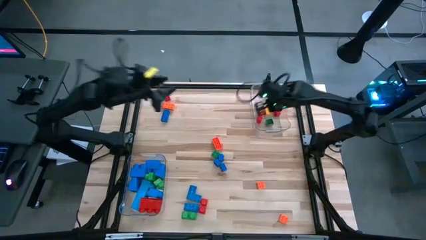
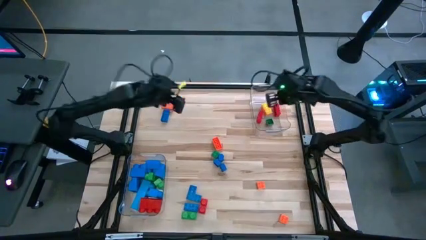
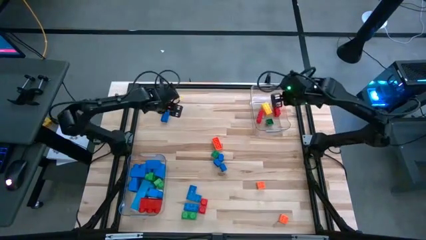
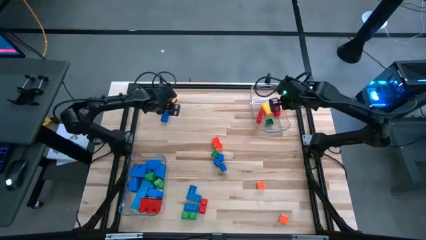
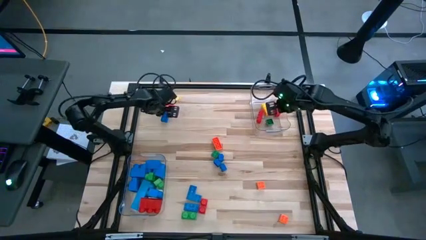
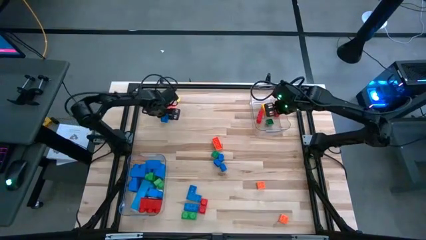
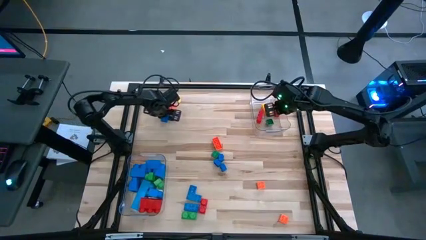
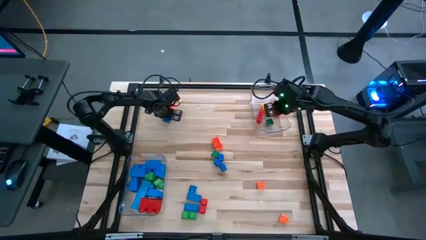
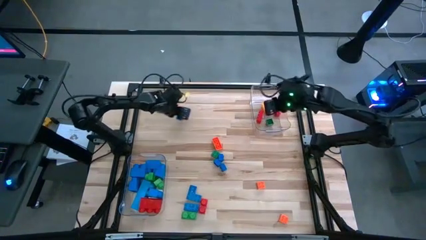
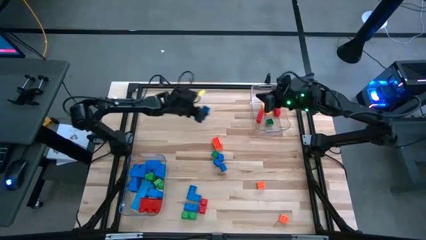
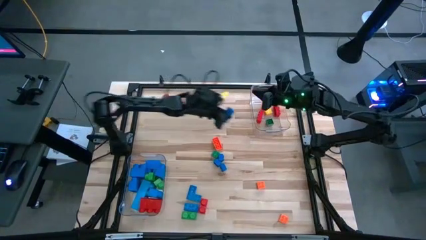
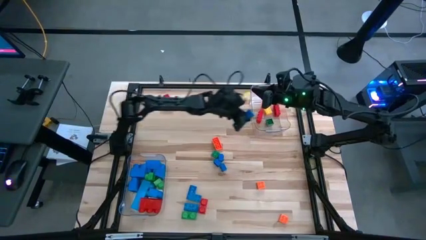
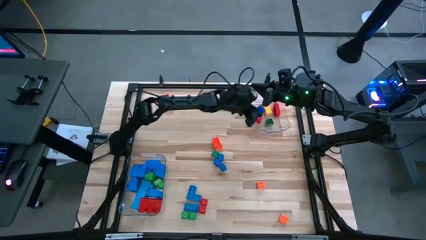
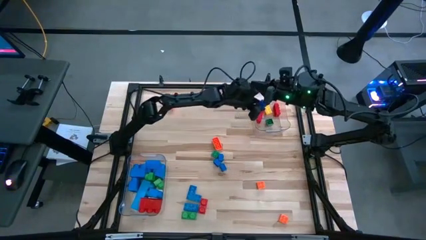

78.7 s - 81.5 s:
Task: Sort blocks by size
Put the small blue game piece into the top transparent bin

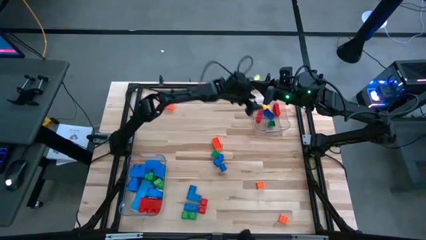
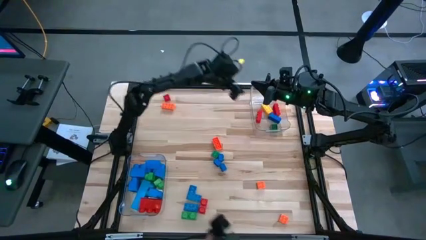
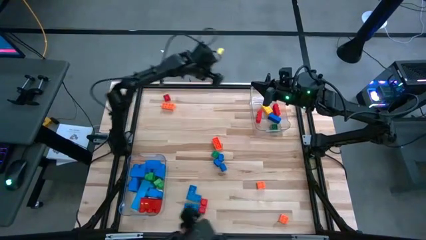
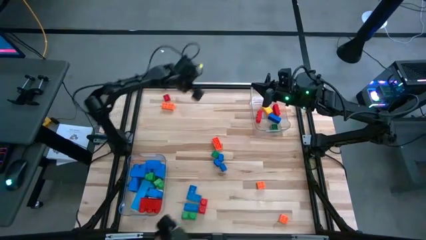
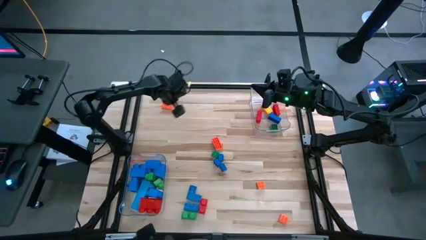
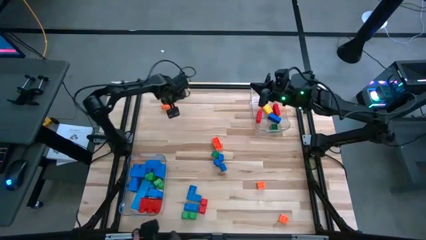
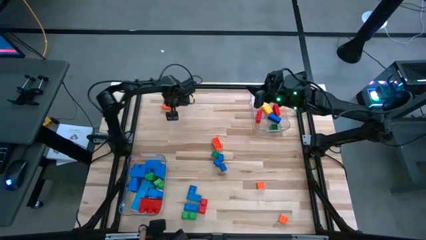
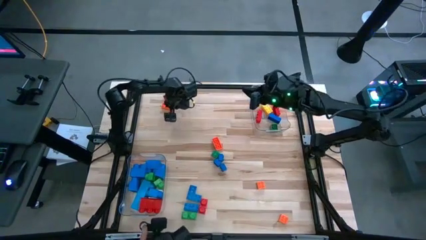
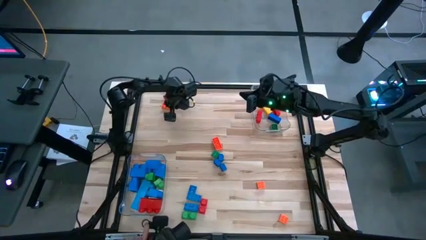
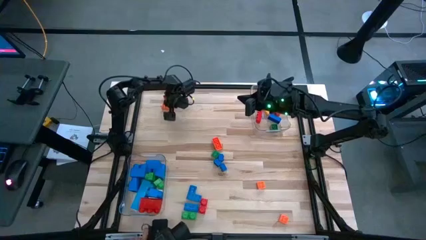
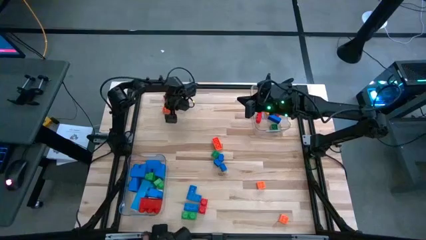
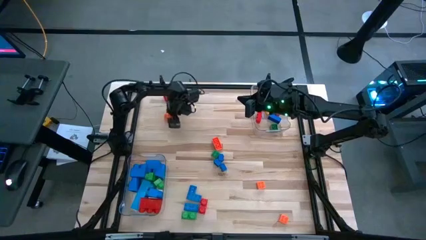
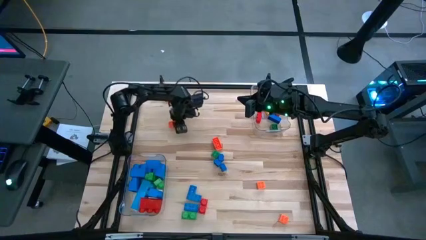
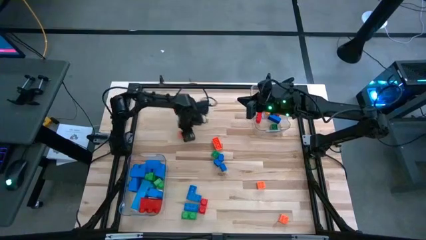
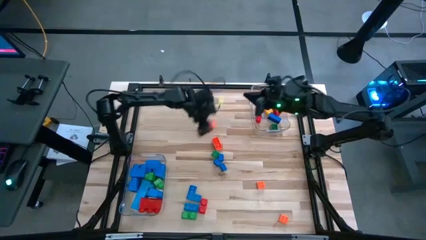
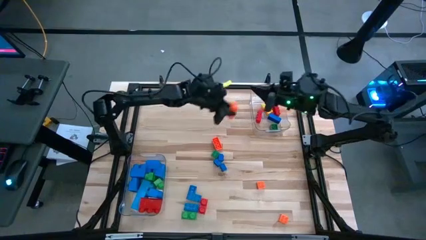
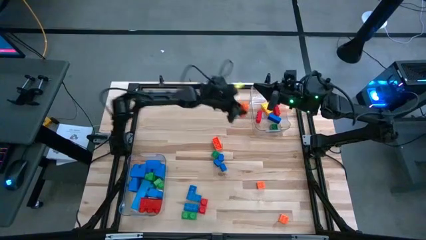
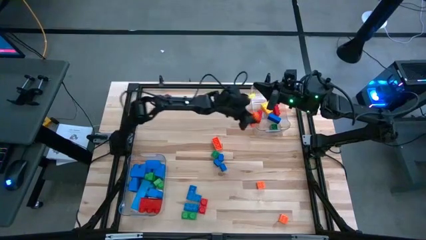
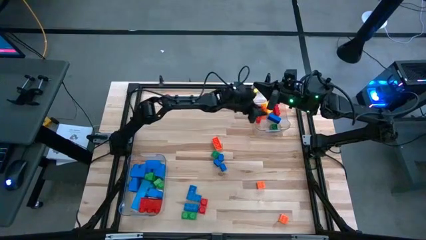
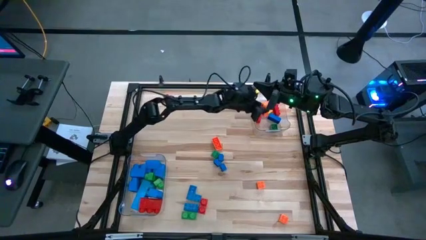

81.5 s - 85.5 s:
Put the small orange game piece into the top transparent bin

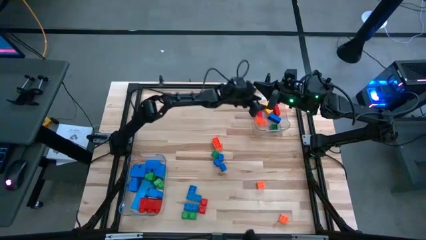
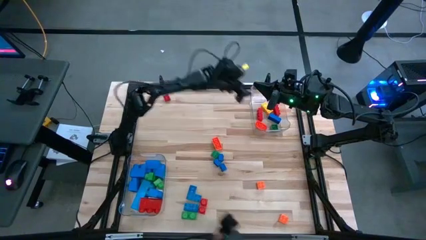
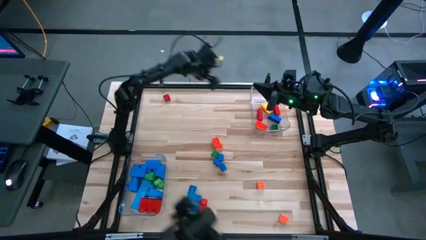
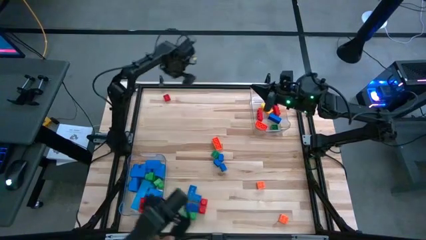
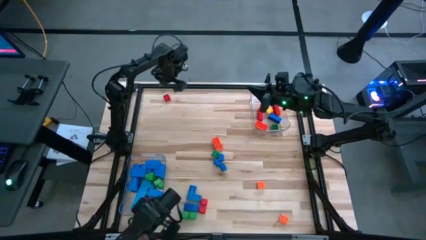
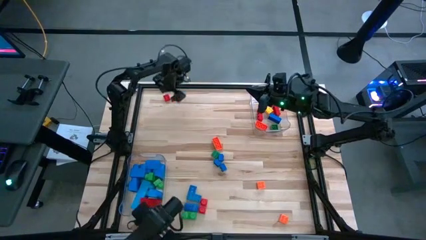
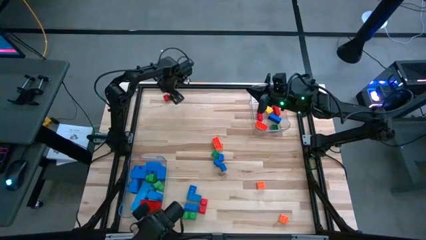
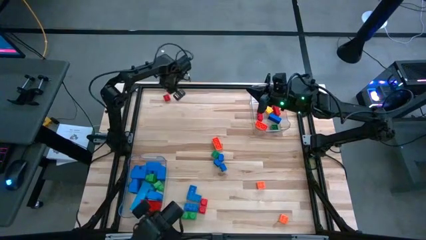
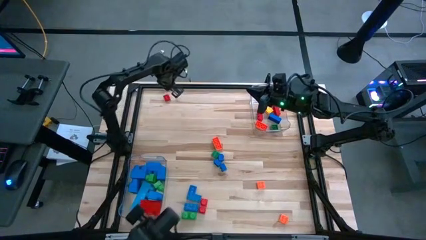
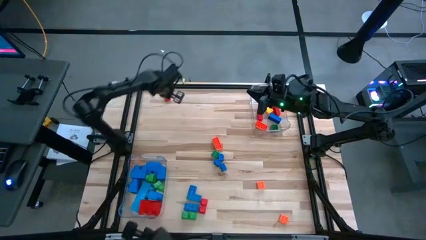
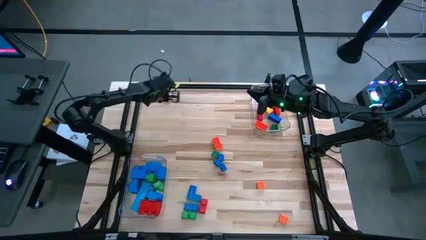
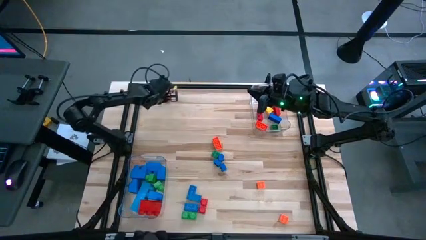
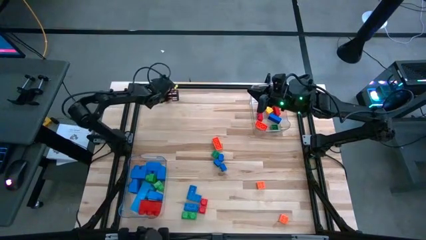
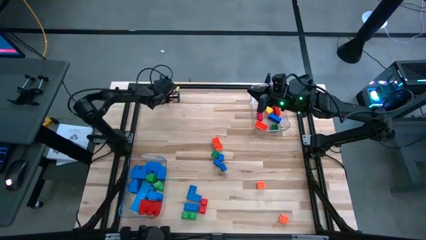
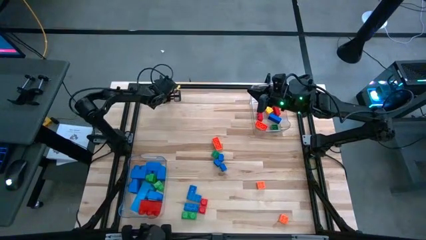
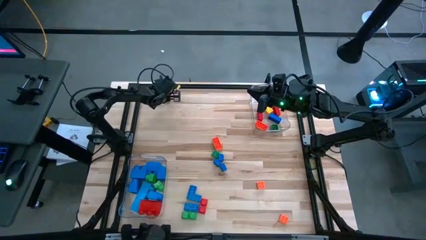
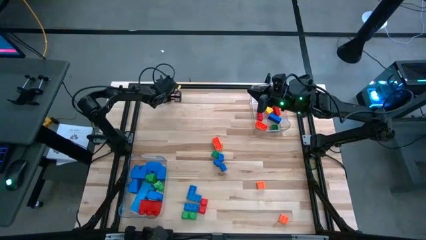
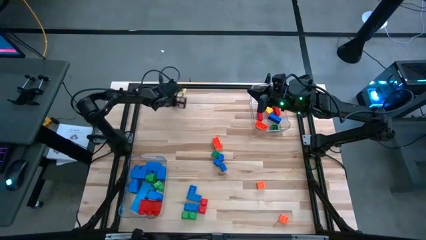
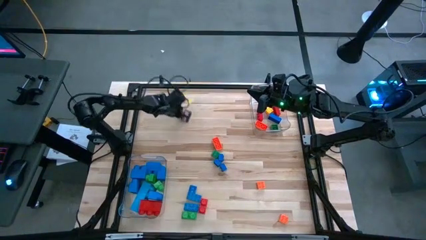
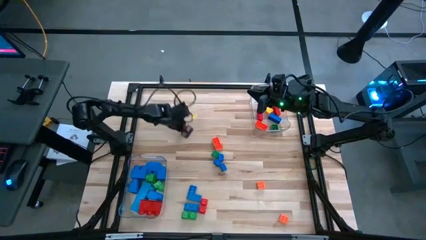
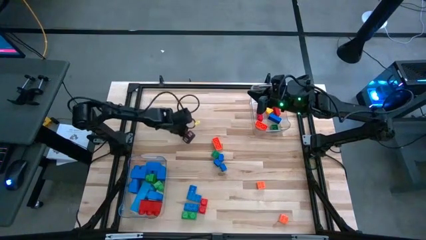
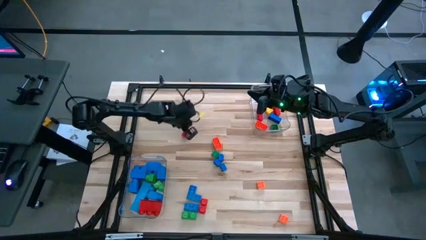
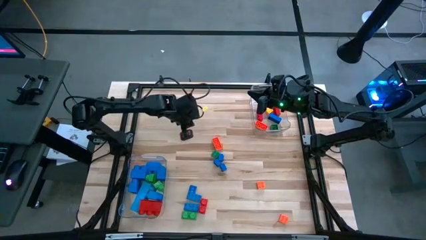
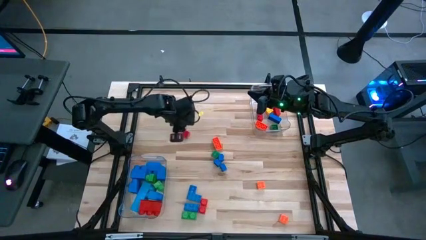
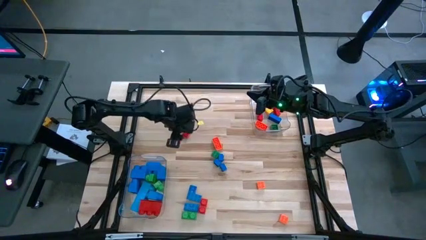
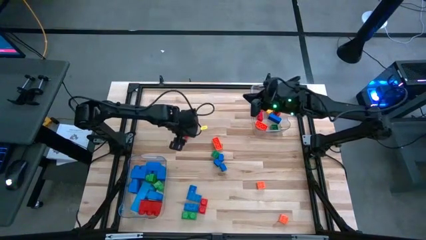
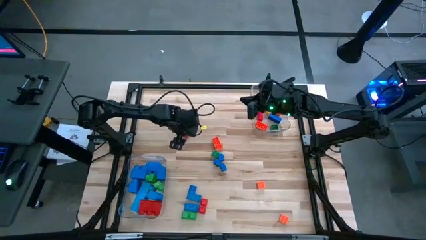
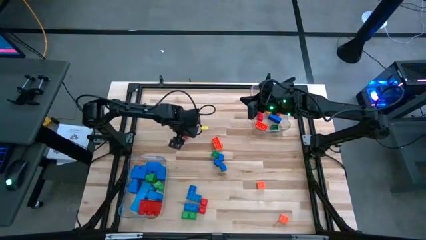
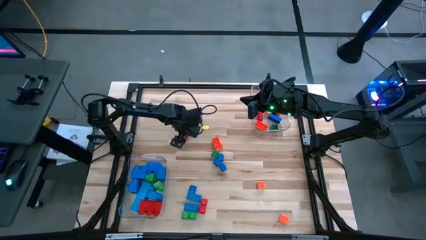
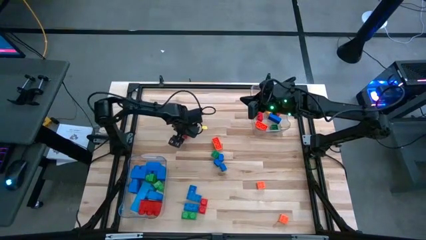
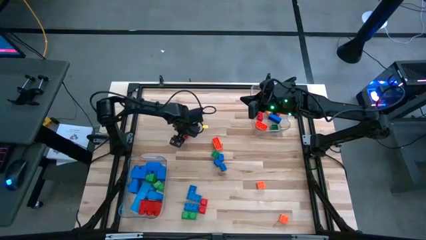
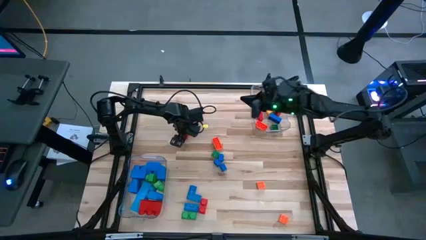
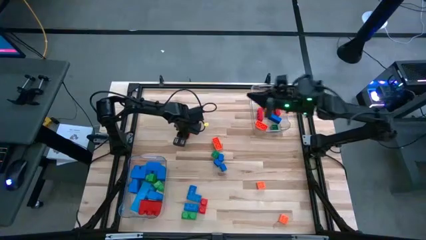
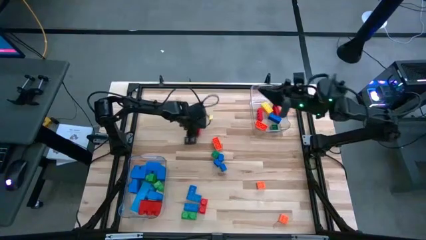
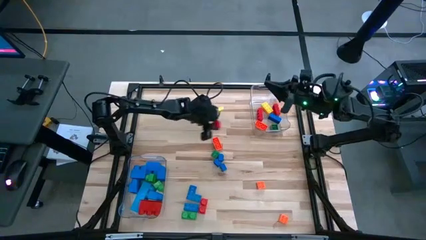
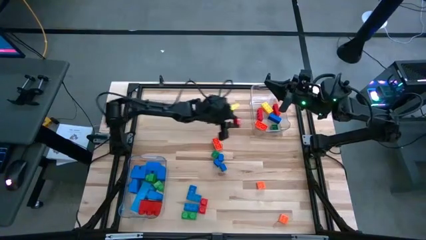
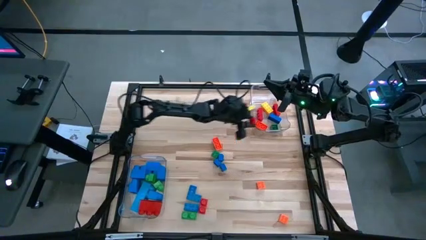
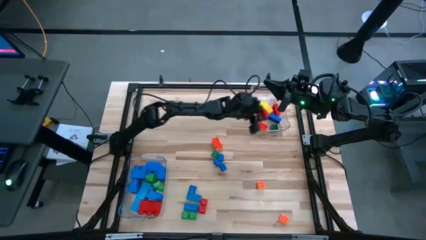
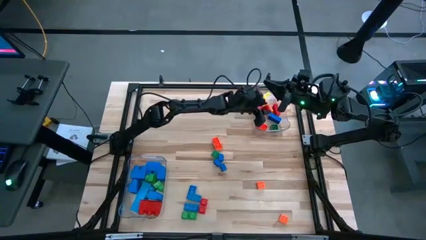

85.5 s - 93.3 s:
Put the small red game piece into the top transparent bin

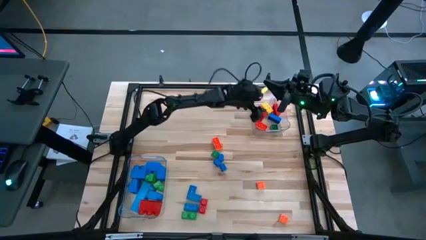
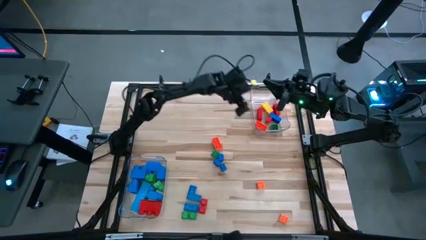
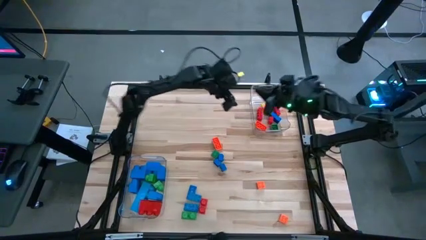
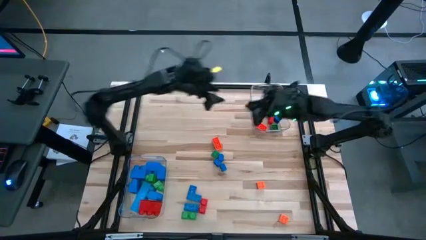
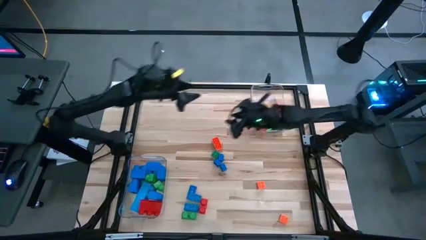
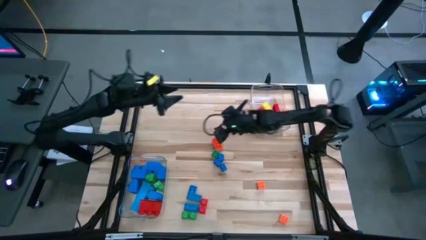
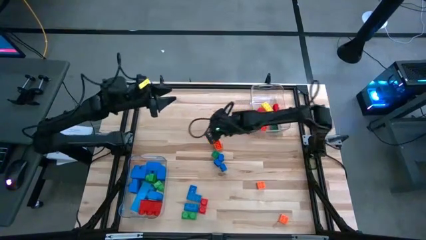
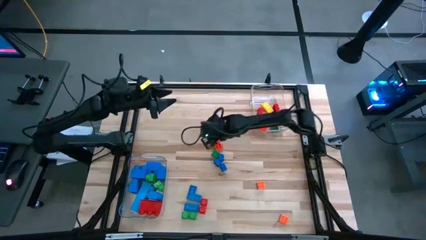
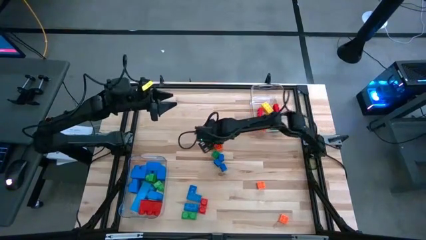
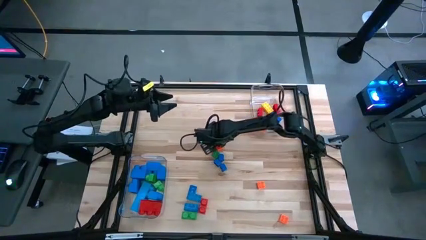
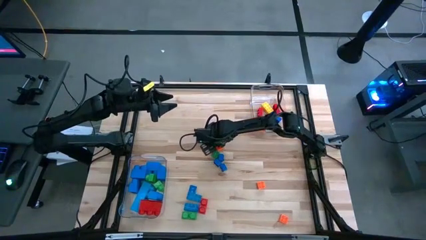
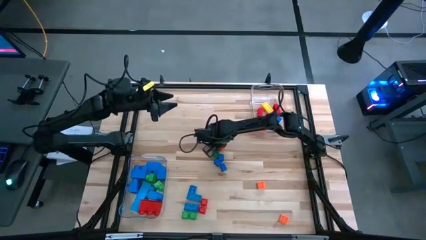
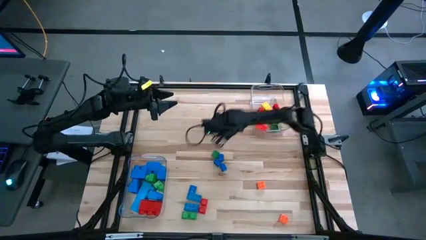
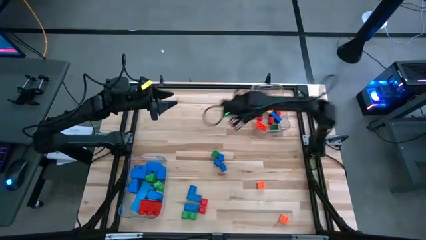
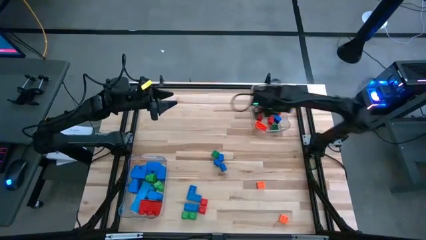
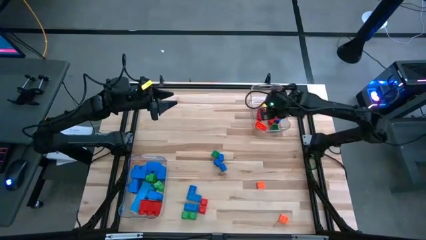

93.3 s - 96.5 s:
Put the small orange game piece into the top transparent bin
